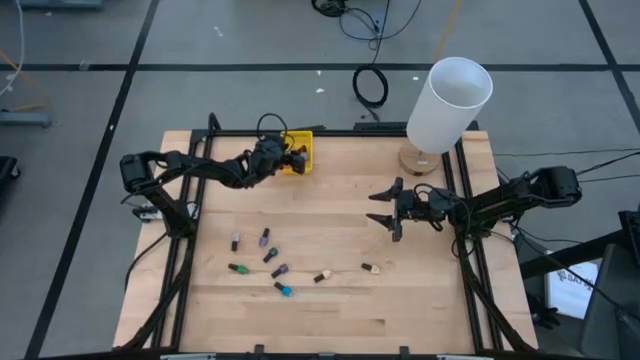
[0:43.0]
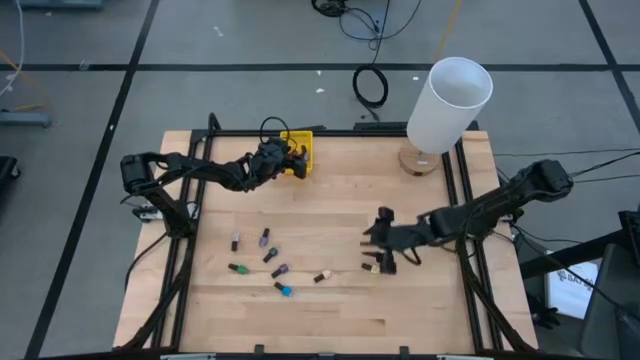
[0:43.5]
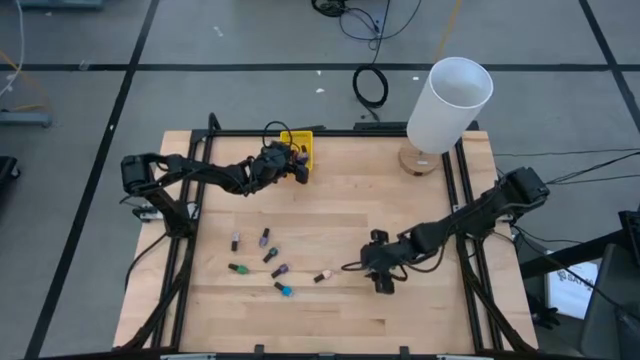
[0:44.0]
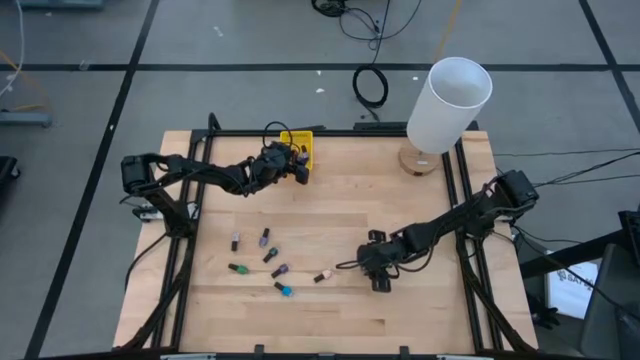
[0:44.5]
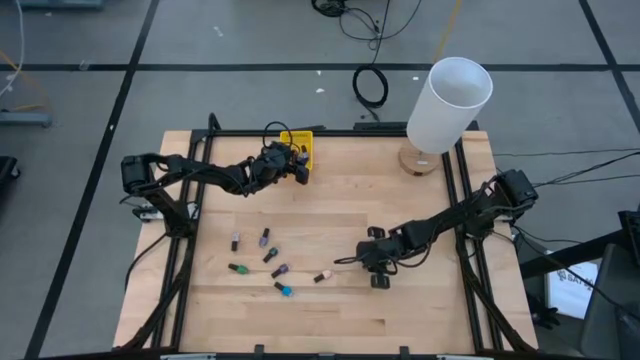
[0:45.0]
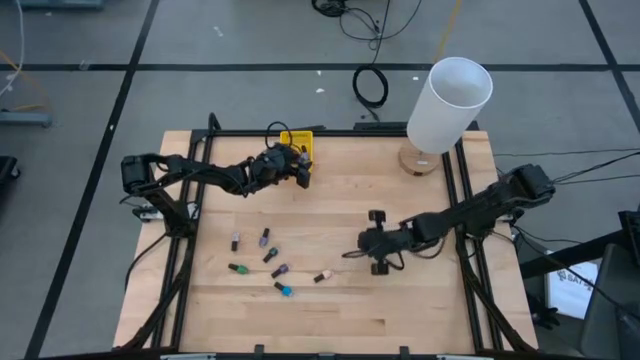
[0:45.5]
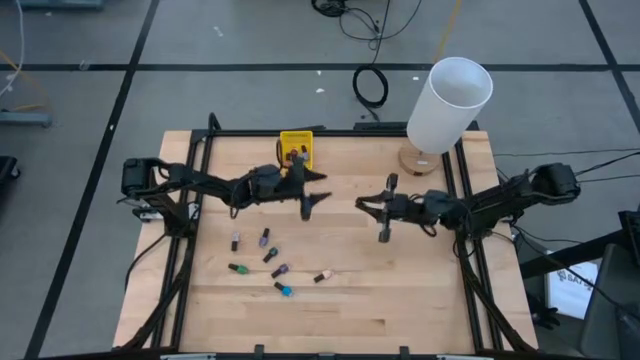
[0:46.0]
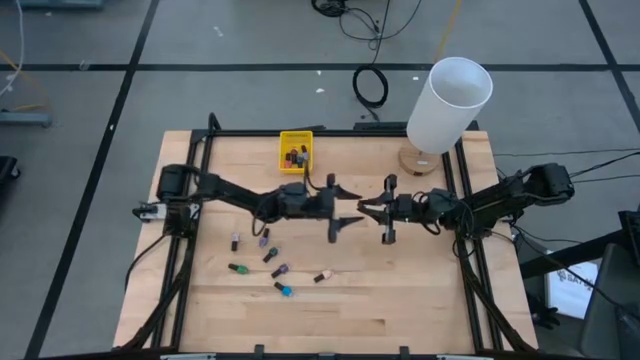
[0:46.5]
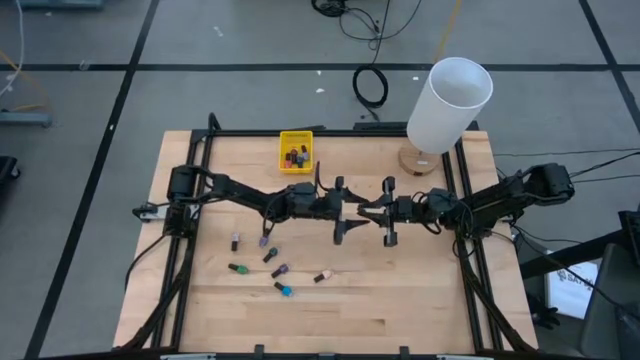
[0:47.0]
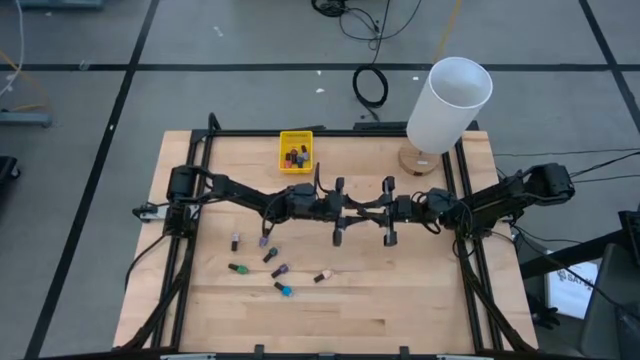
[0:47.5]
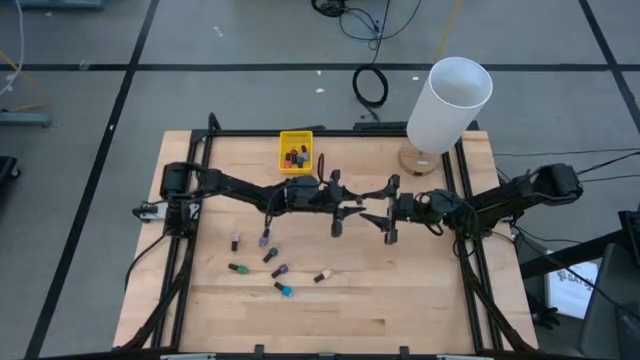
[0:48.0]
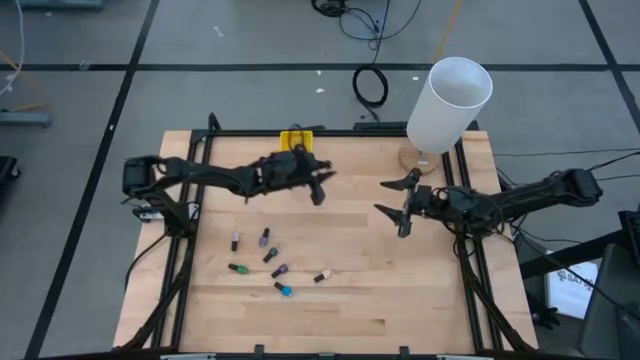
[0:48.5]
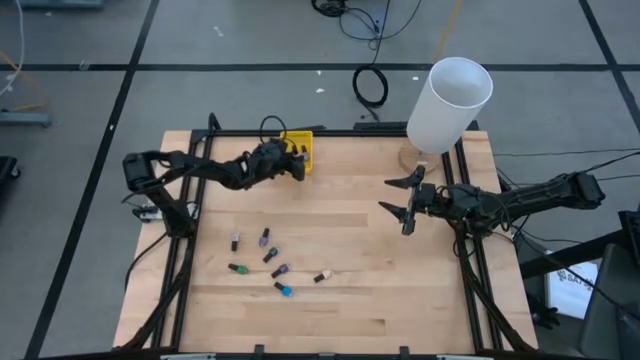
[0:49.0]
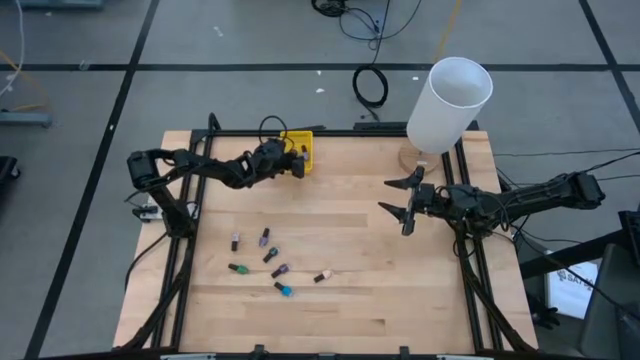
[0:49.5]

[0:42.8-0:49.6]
Task: Pick & Place Nail Polish
Put the yellow nail polish bottle into the yellow bin

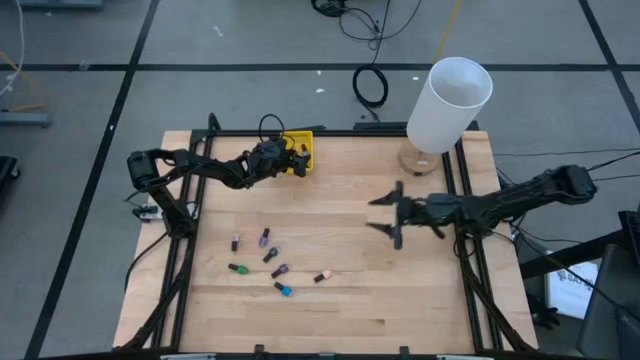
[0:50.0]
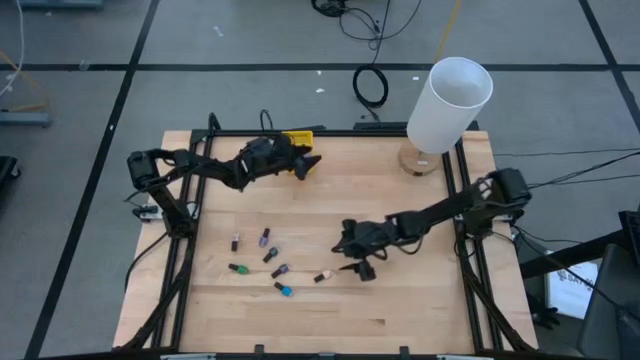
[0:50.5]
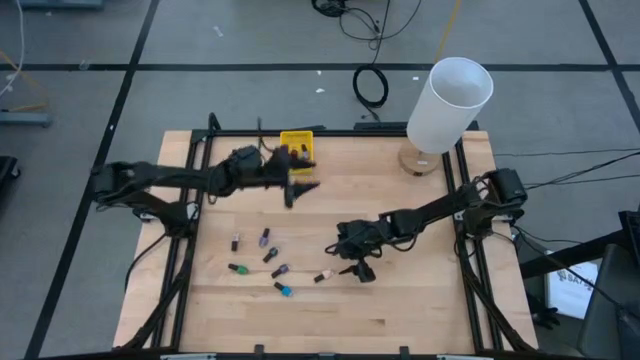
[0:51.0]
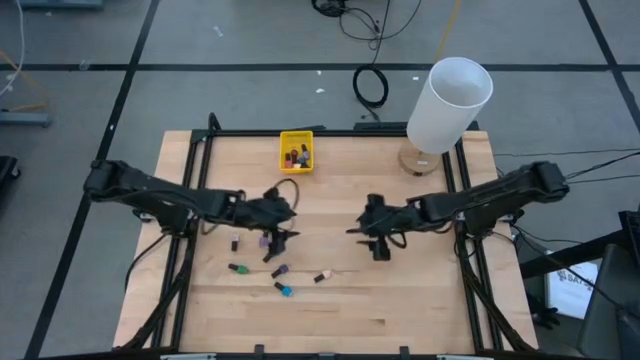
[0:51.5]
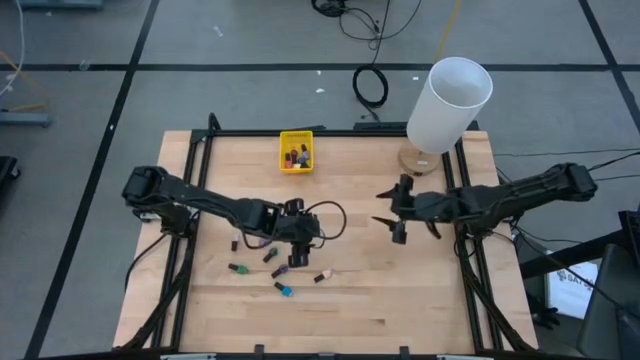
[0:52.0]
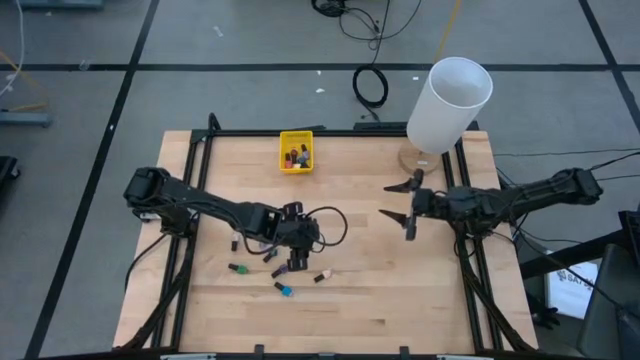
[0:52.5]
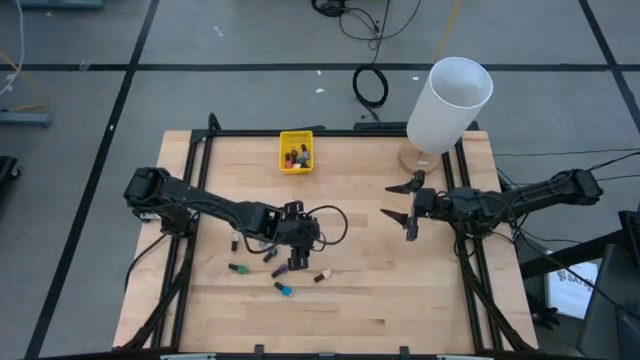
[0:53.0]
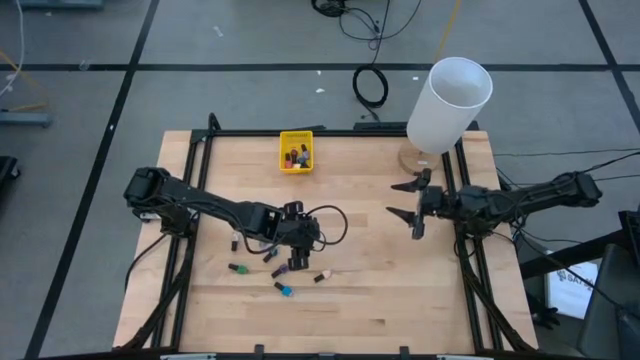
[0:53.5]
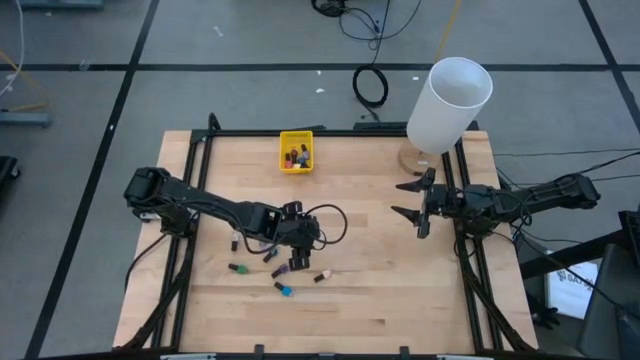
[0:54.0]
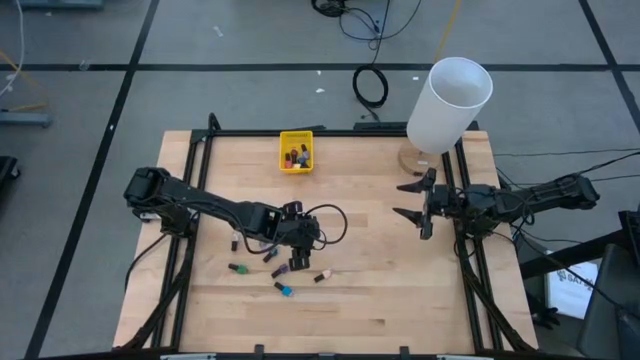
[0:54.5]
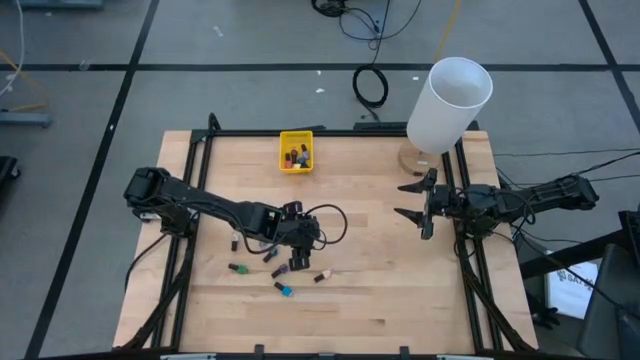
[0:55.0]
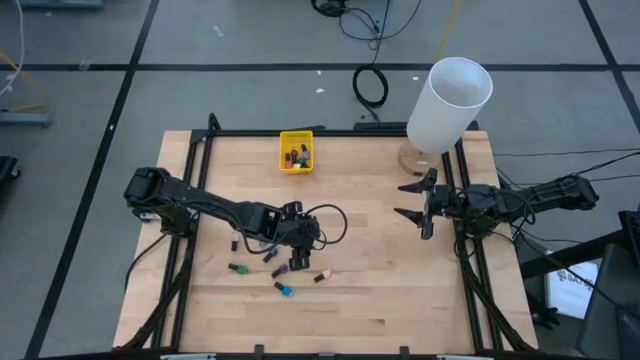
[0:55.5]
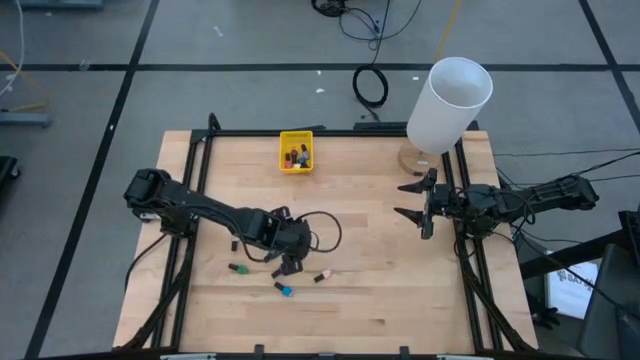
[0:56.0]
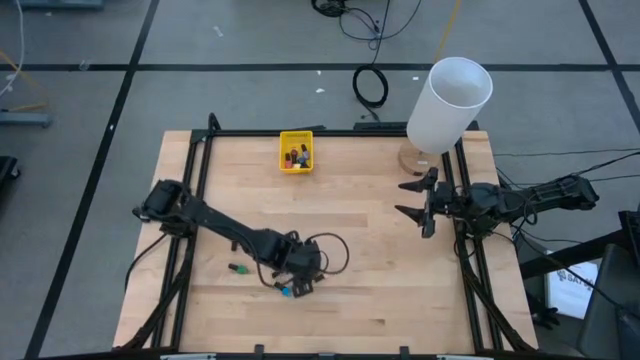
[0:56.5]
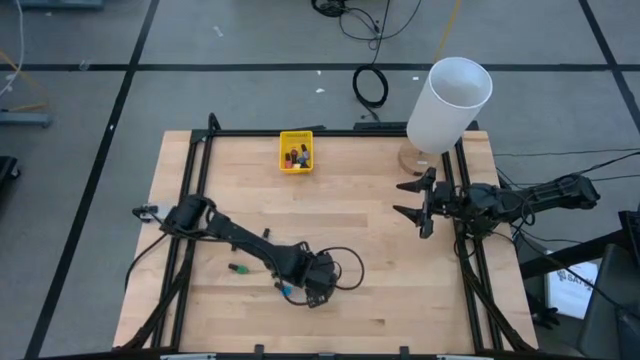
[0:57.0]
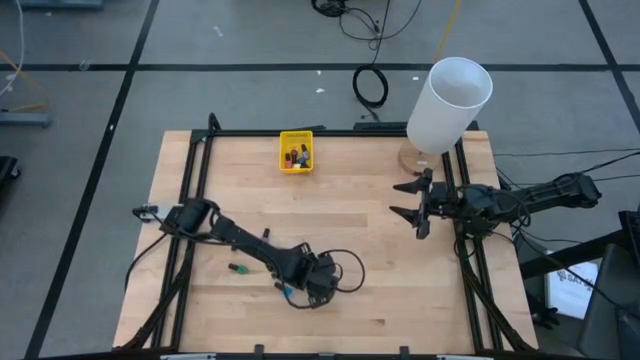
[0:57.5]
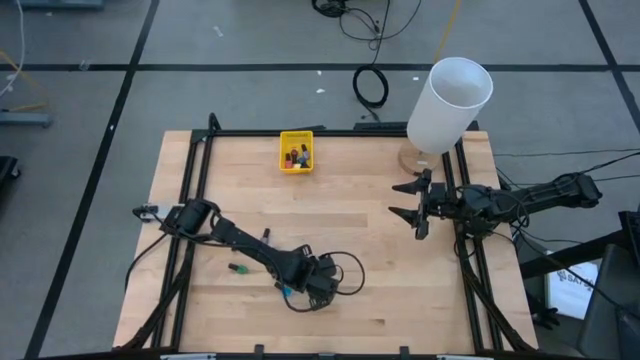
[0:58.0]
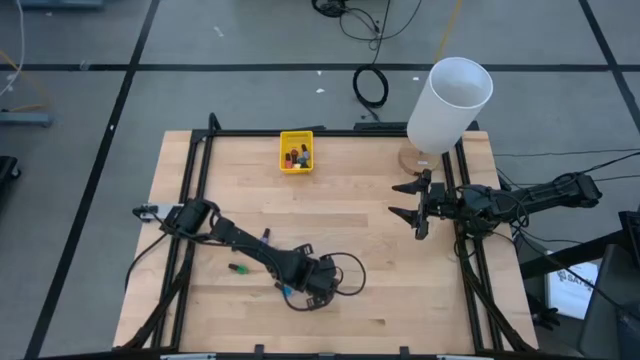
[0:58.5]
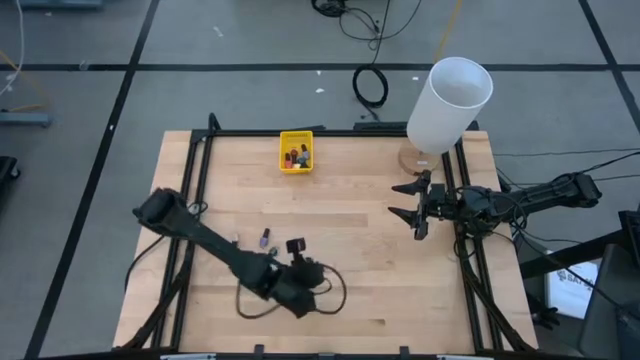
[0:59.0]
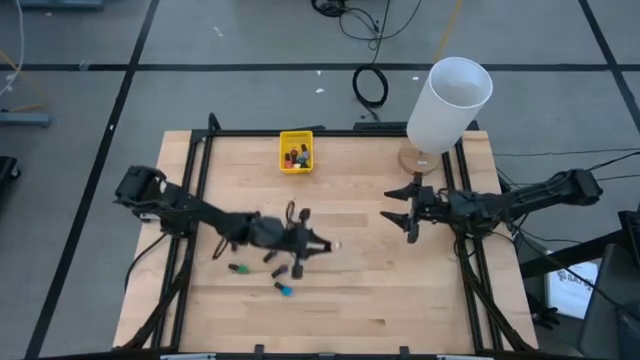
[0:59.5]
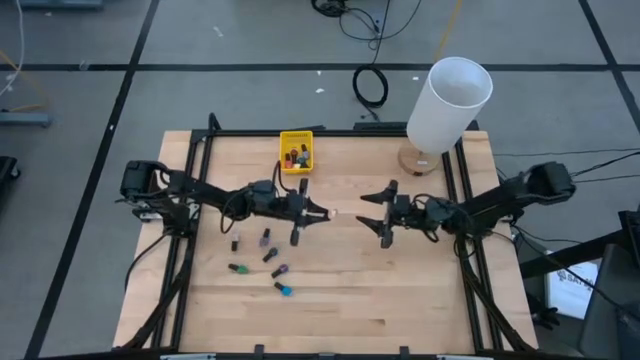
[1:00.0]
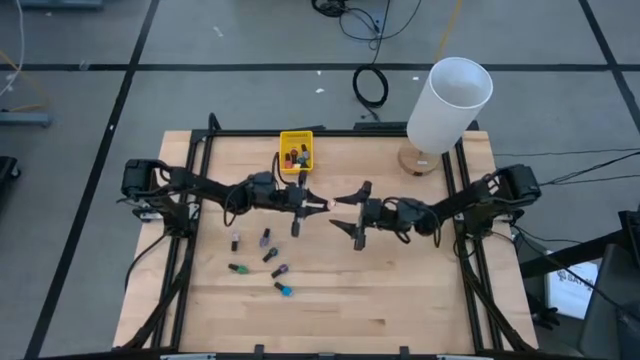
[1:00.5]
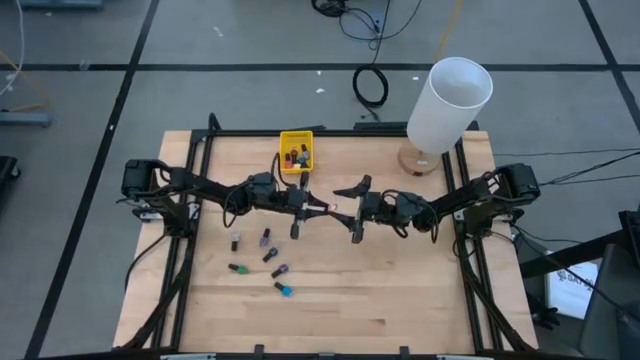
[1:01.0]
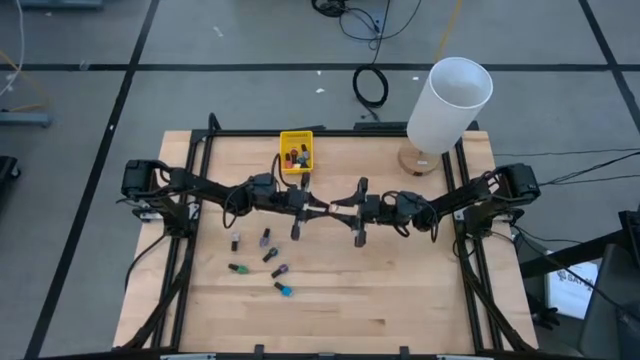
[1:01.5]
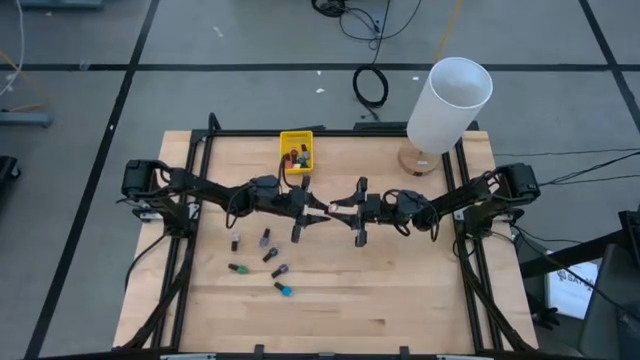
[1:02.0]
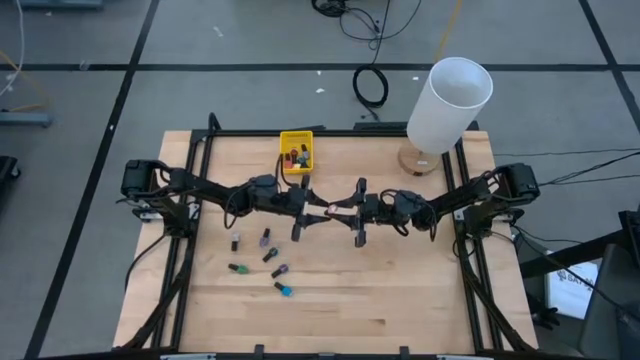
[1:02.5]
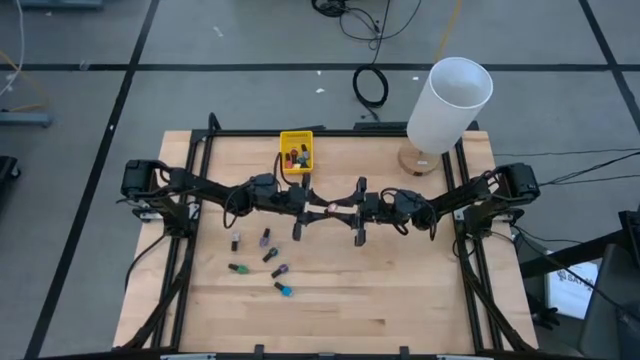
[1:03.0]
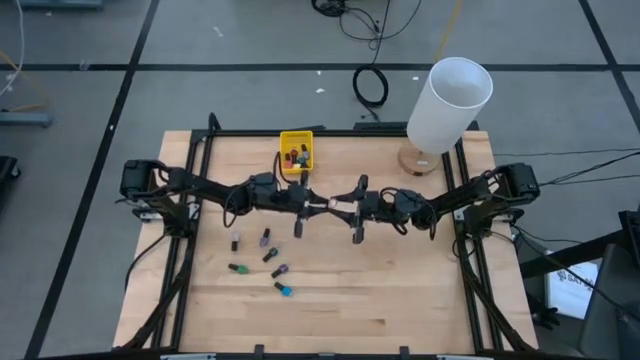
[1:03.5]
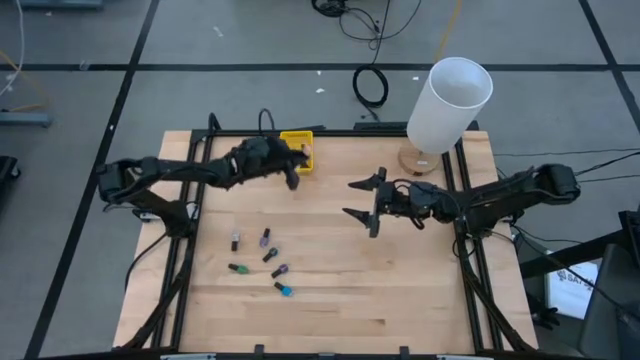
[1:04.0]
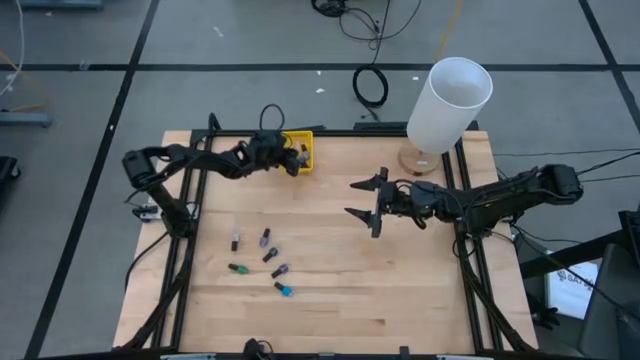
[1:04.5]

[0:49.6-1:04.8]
Put the pink nail polish bottle into the yellow bin
